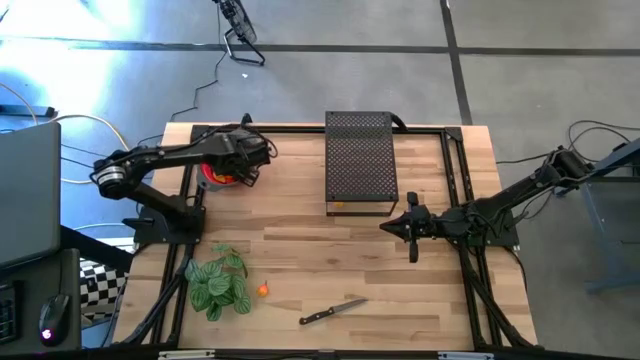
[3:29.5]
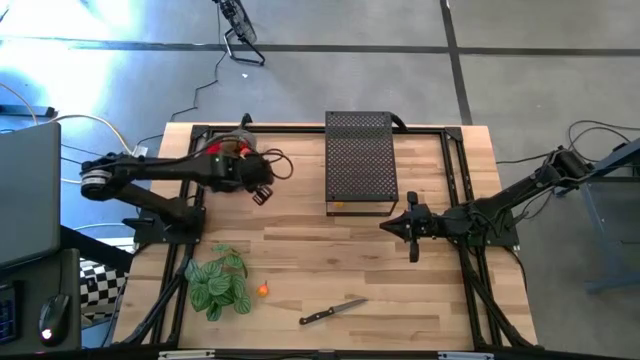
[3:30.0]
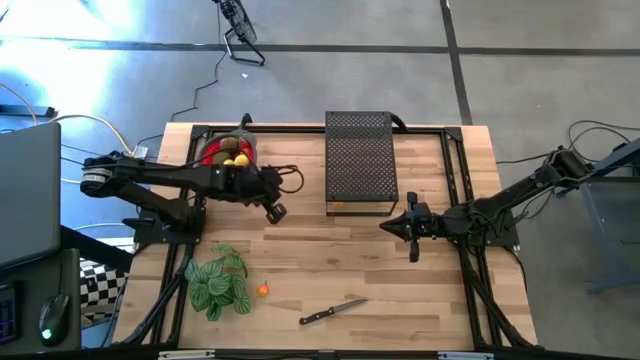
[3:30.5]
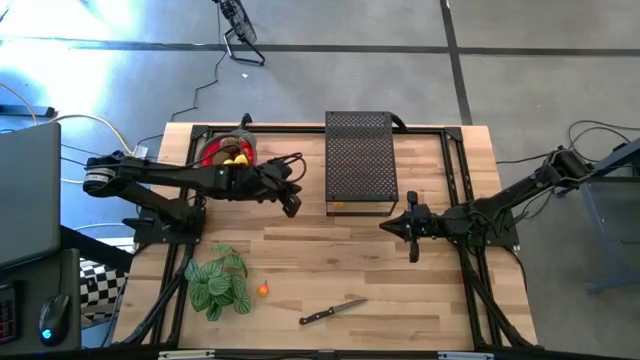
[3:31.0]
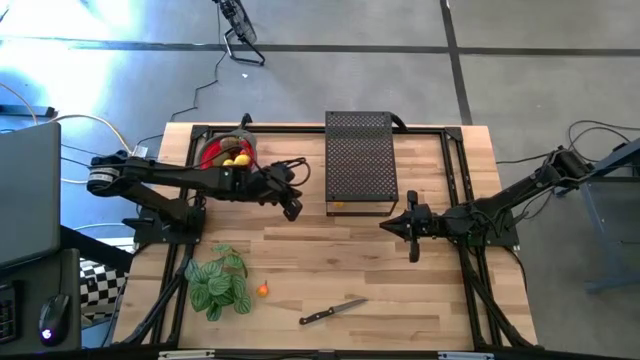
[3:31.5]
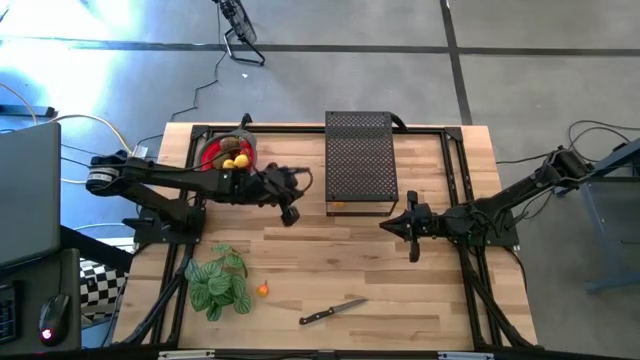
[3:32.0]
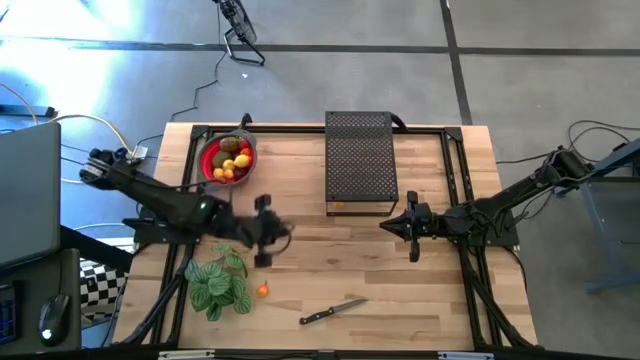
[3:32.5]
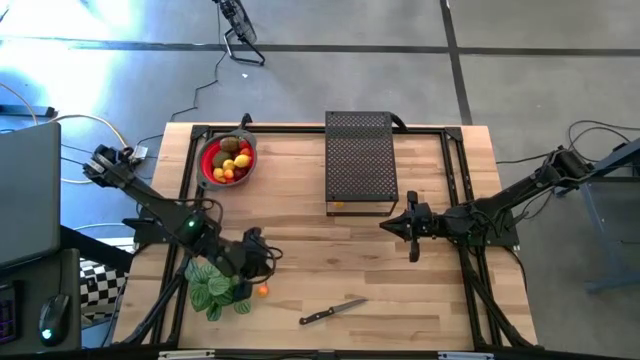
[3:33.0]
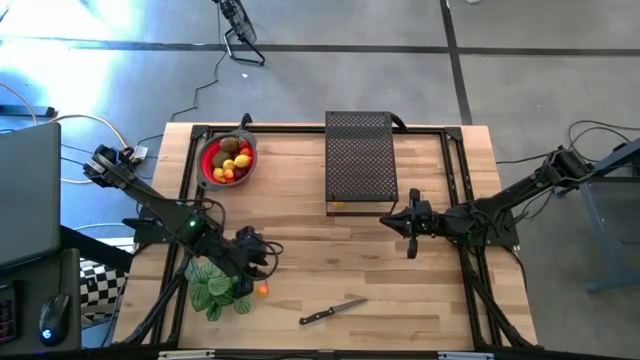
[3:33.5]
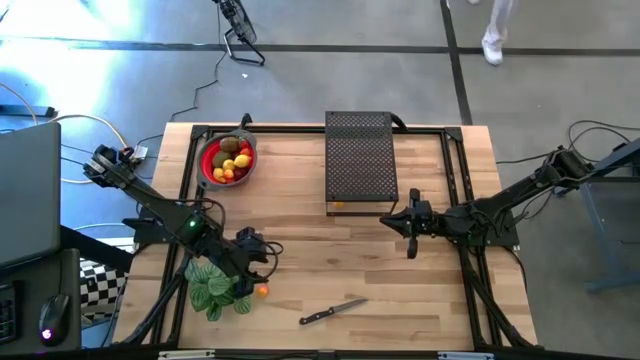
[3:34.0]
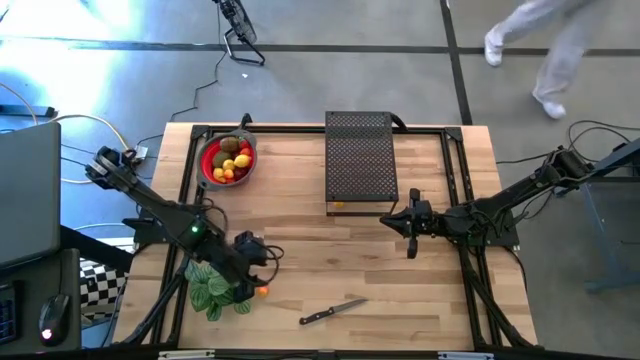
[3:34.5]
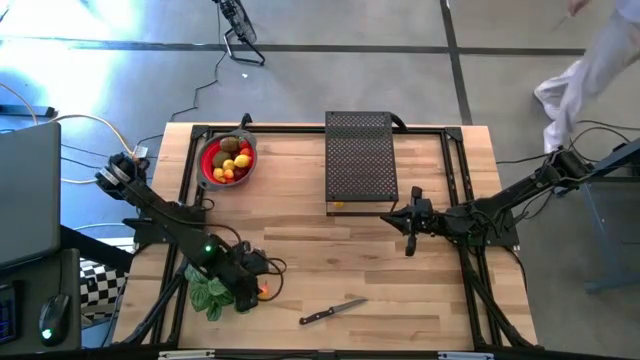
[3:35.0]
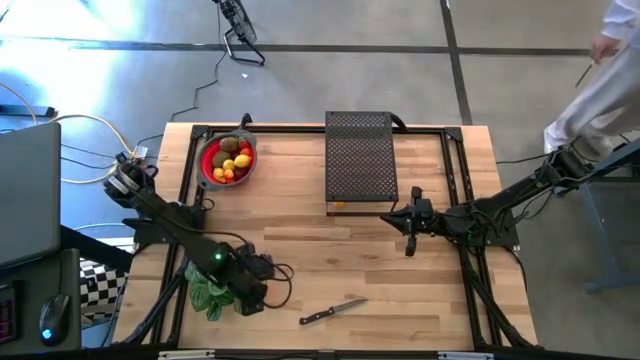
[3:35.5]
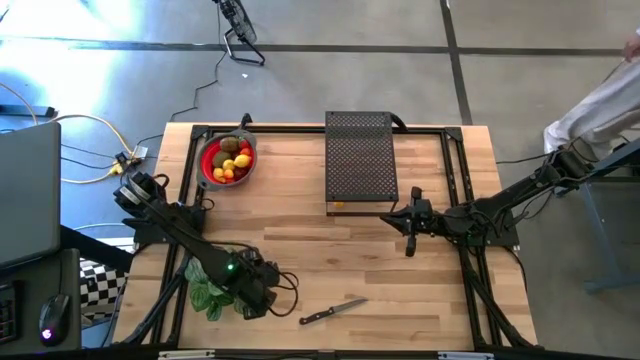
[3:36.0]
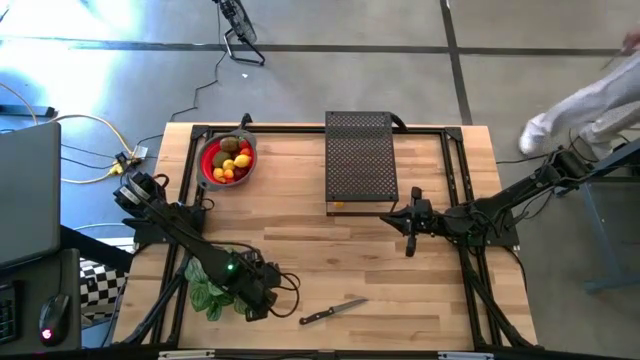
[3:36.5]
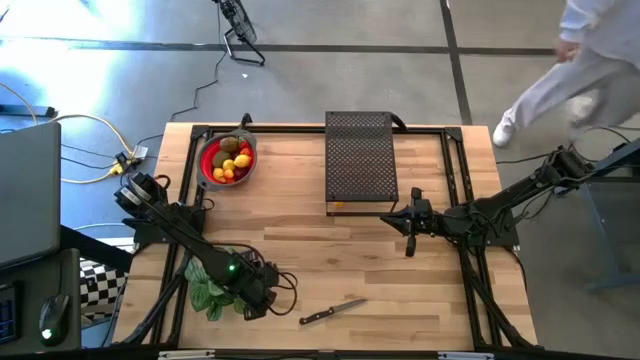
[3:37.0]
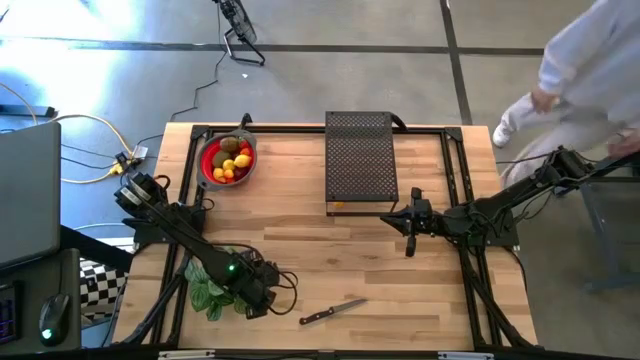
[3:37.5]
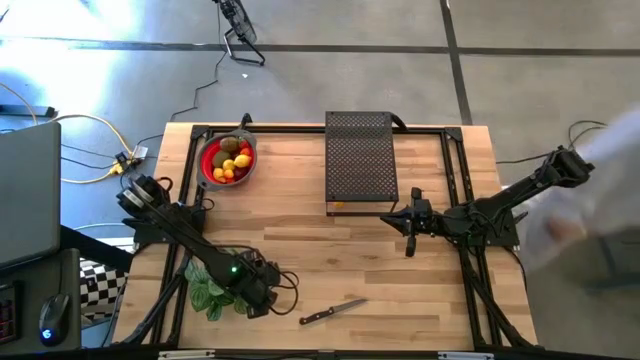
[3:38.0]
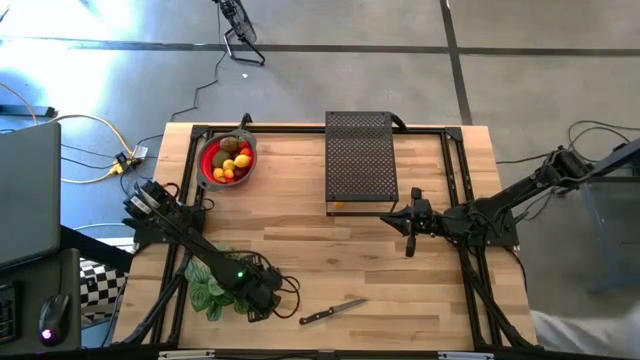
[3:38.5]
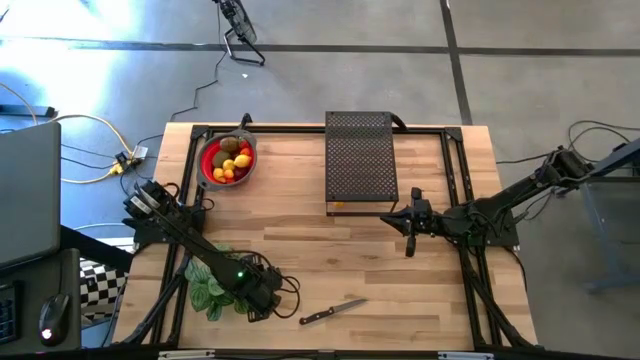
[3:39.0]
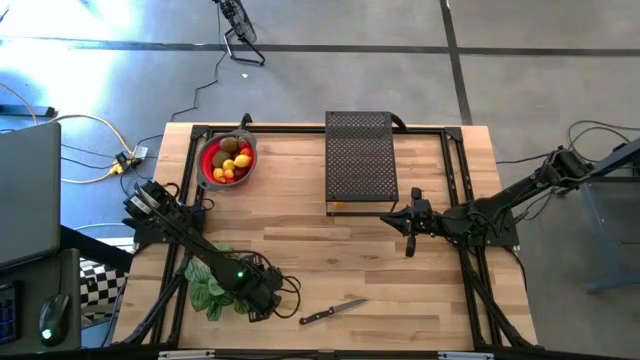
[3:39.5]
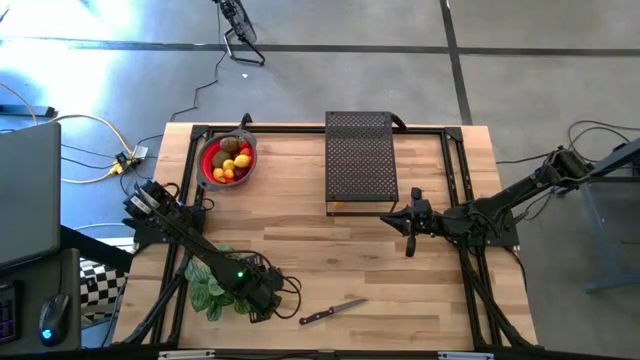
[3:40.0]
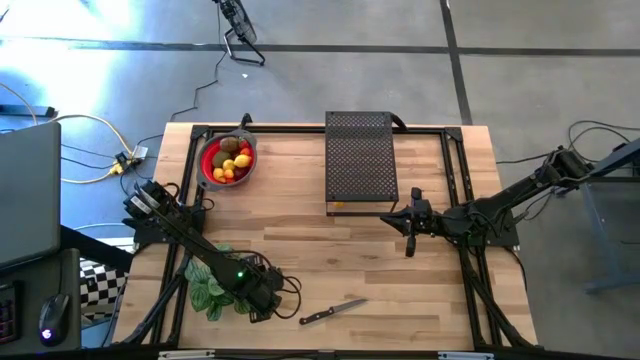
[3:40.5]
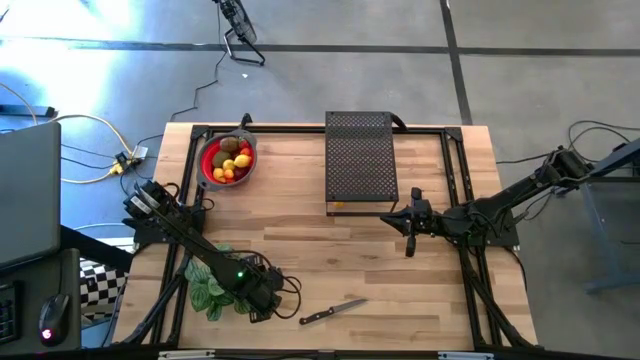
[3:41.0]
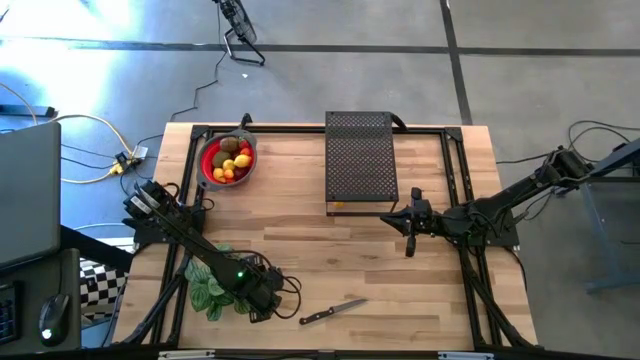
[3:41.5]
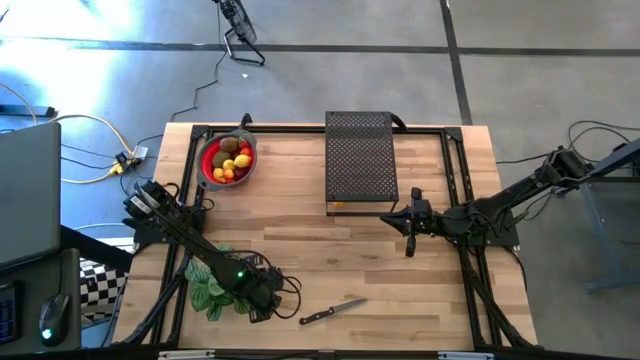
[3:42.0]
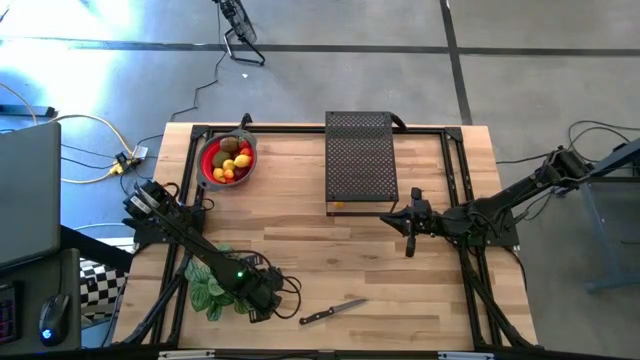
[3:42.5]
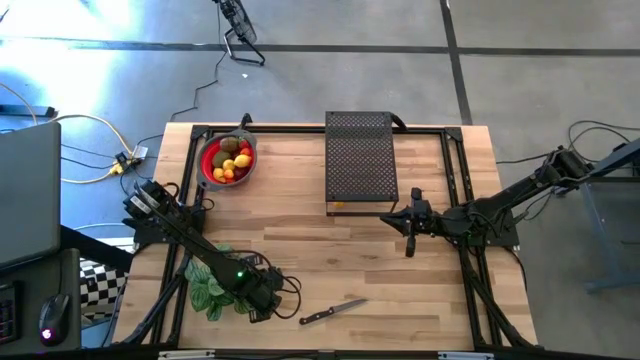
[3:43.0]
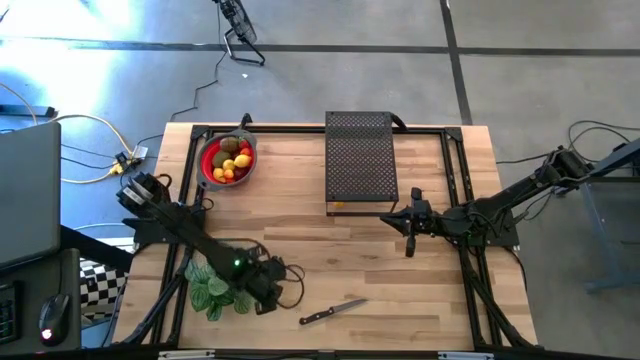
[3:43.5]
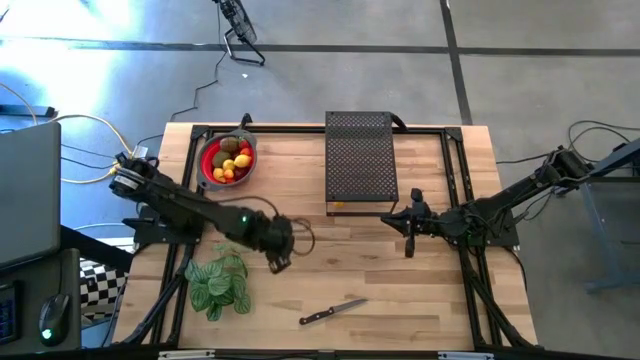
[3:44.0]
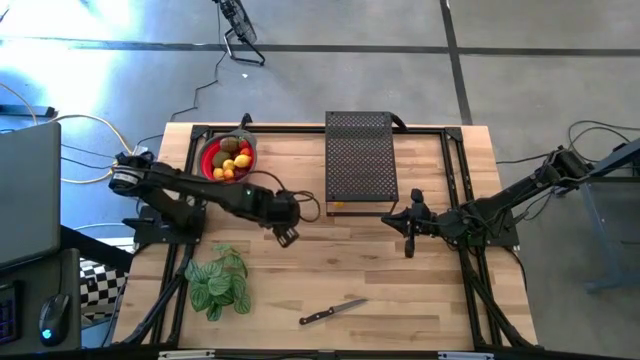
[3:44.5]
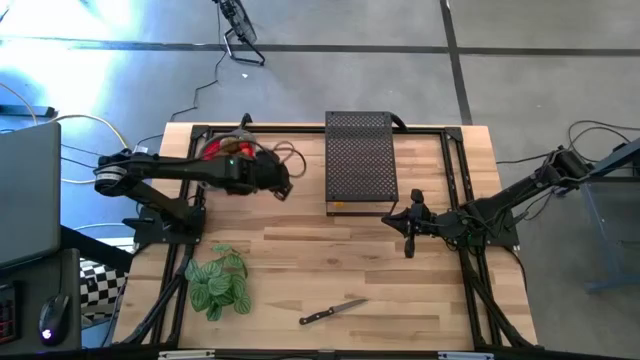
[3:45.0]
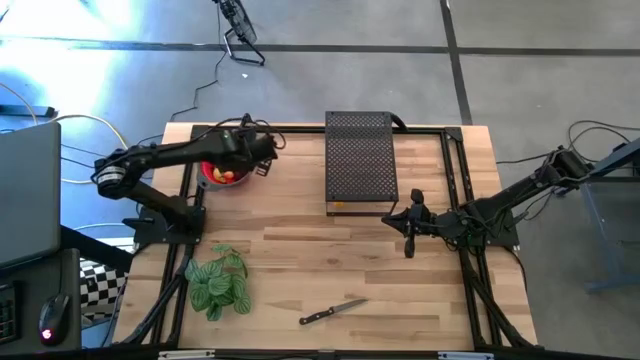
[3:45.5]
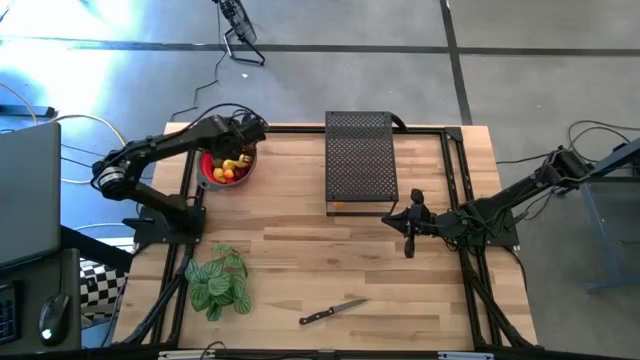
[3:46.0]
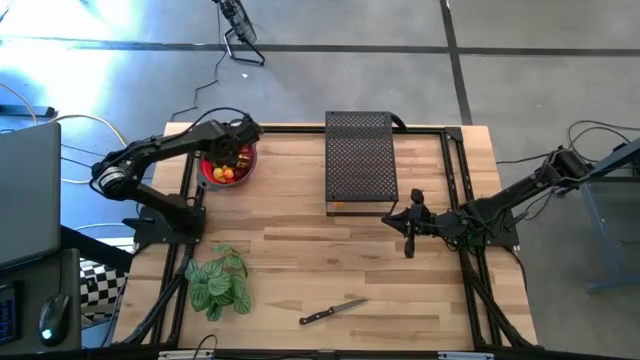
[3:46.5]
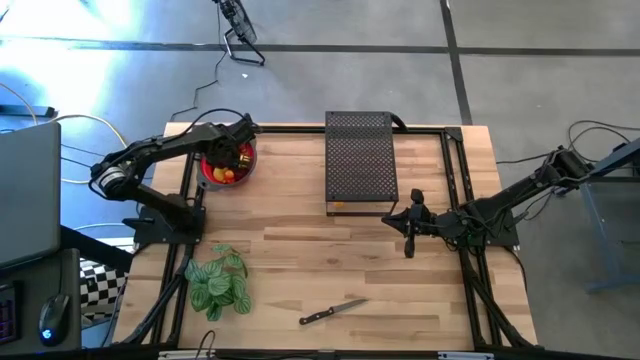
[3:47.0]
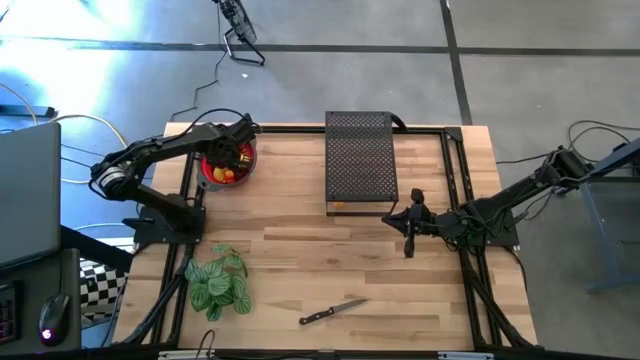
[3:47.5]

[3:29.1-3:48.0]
Task: Pick & Place Fruit
Put the orange pear into the strainer bowl

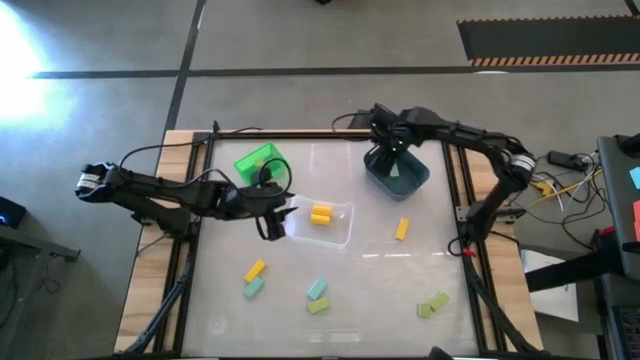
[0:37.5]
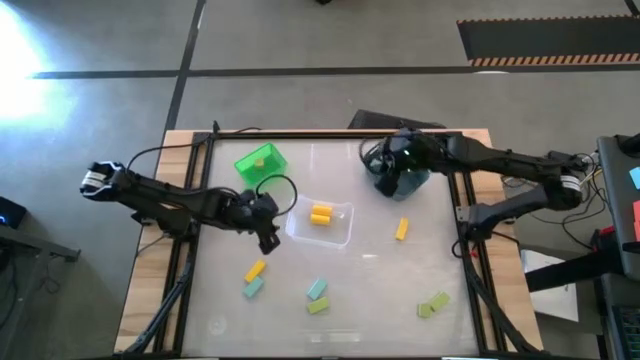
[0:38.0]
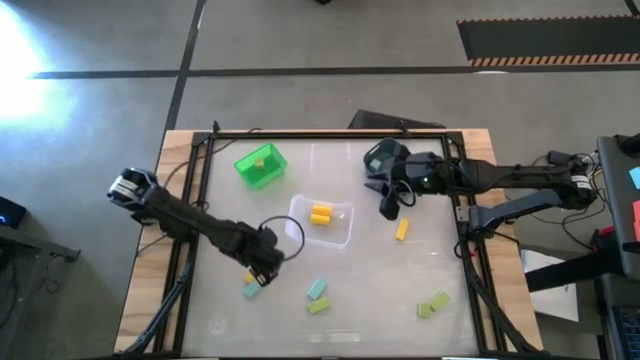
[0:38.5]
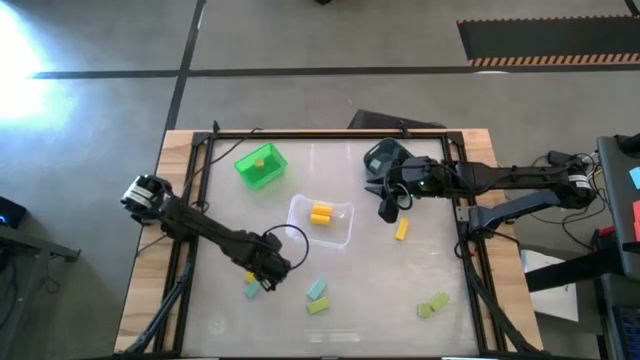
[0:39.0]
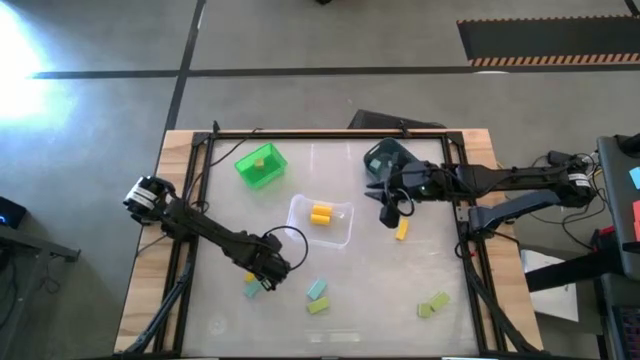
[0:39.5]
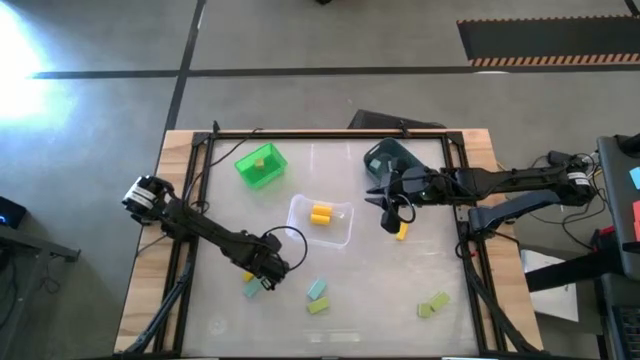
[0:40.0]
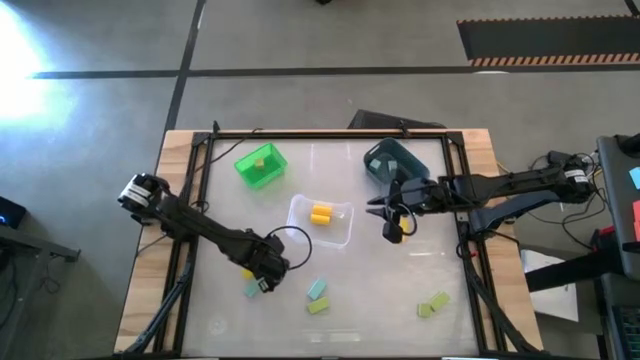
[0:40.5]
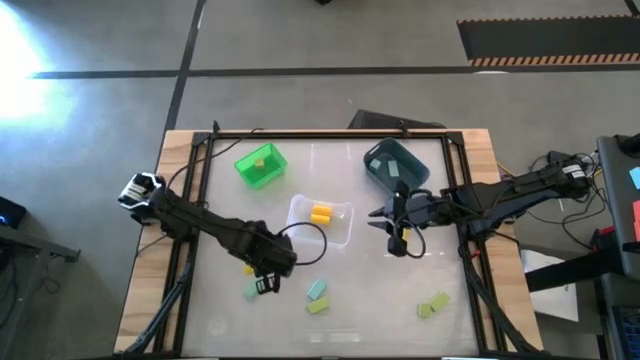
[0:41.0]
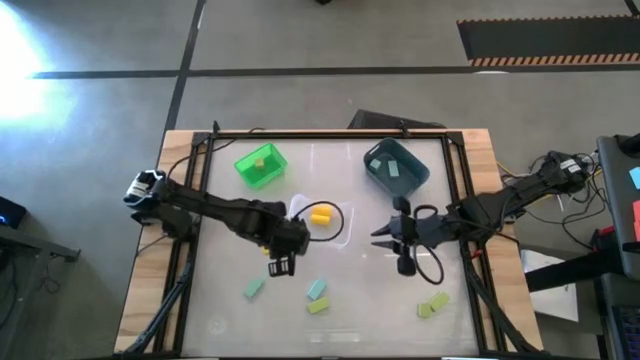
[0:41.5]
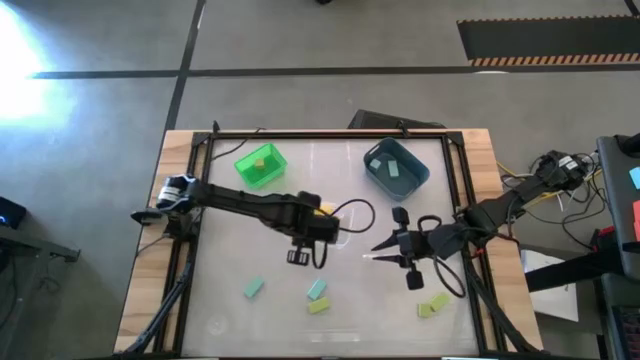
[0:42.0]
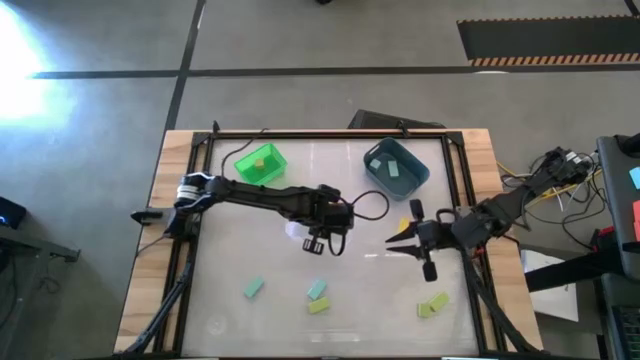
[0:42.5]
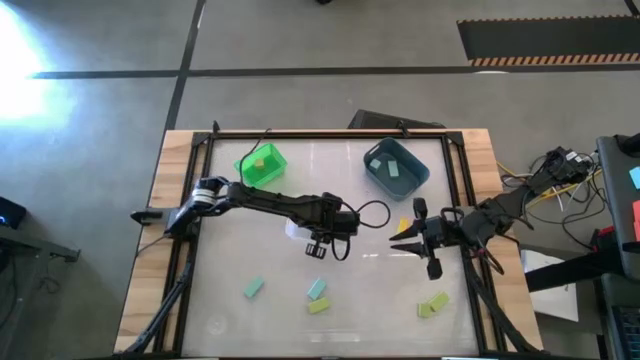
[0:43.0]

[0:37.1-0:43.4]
Task: Sort & place blocks by color
Put the yellow block into the transparent bin
